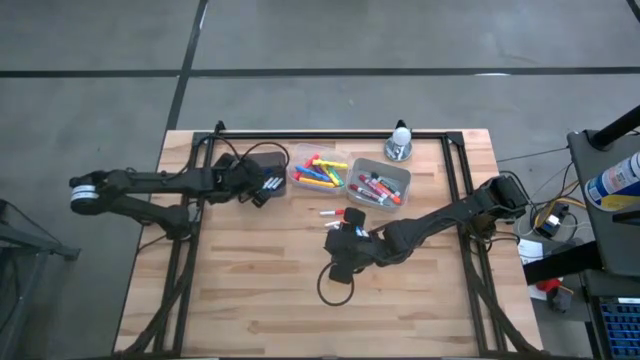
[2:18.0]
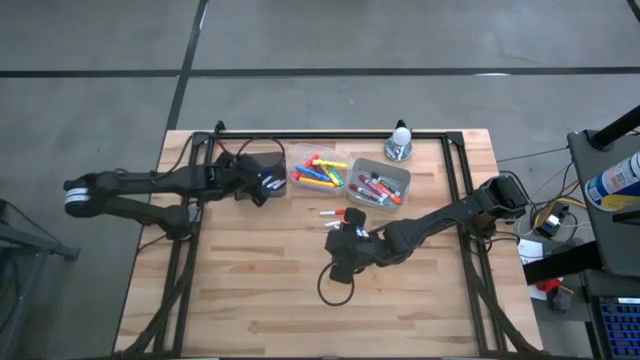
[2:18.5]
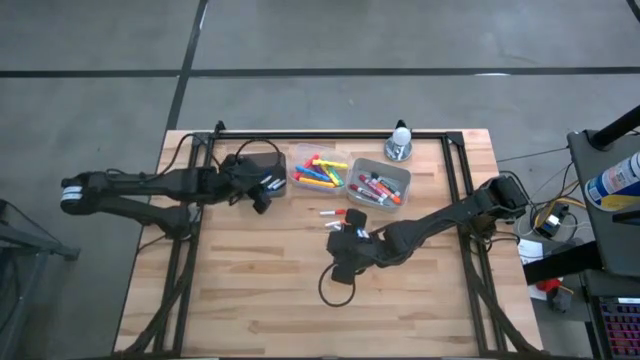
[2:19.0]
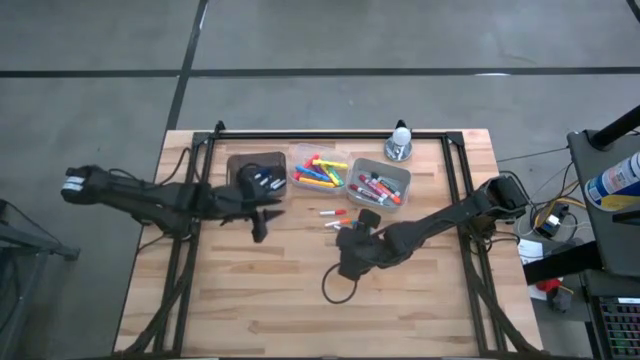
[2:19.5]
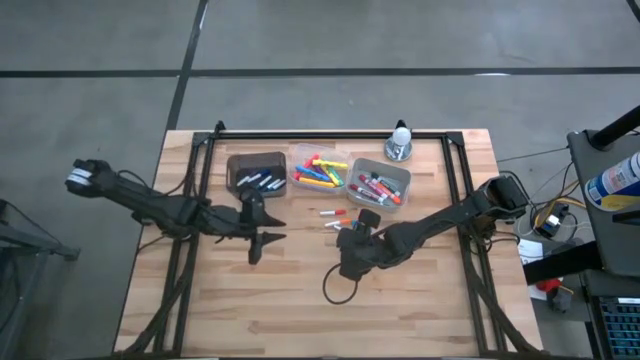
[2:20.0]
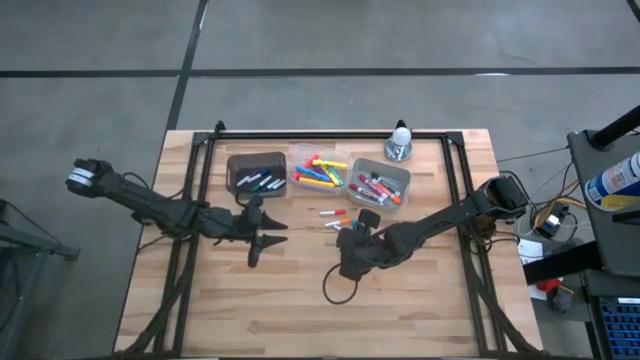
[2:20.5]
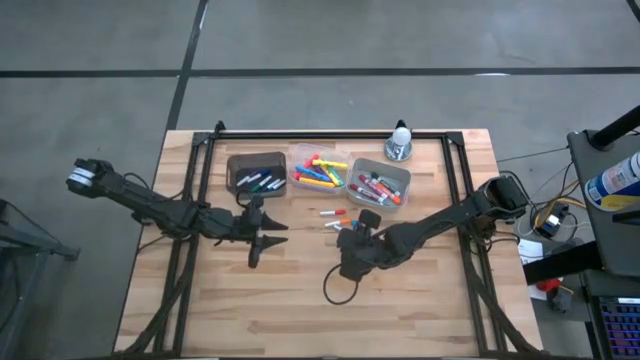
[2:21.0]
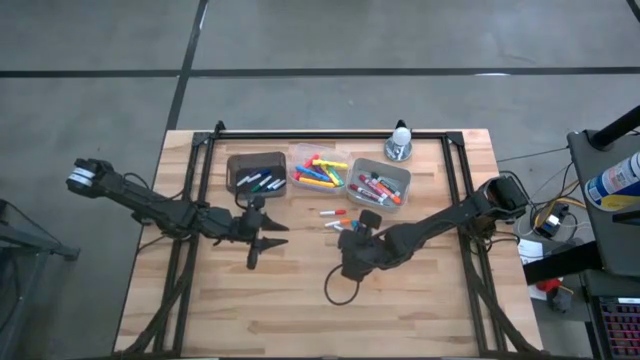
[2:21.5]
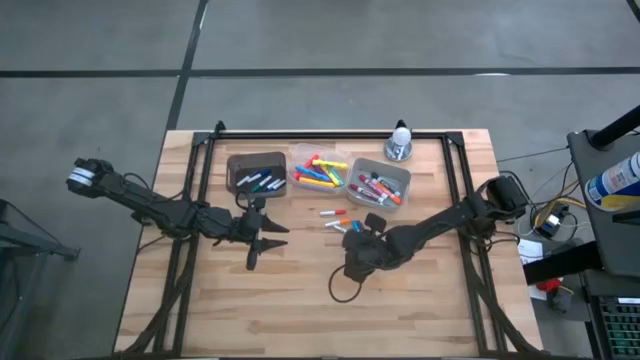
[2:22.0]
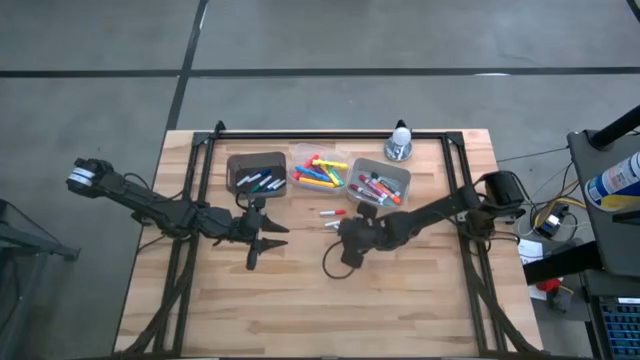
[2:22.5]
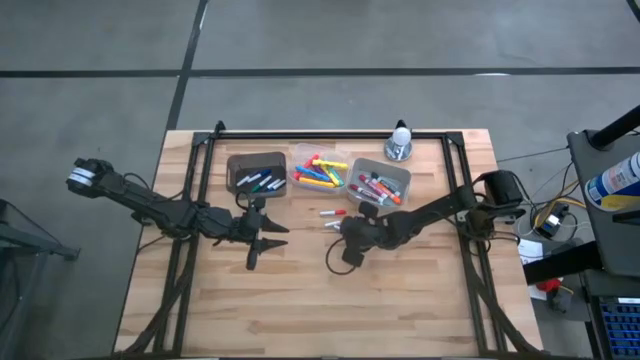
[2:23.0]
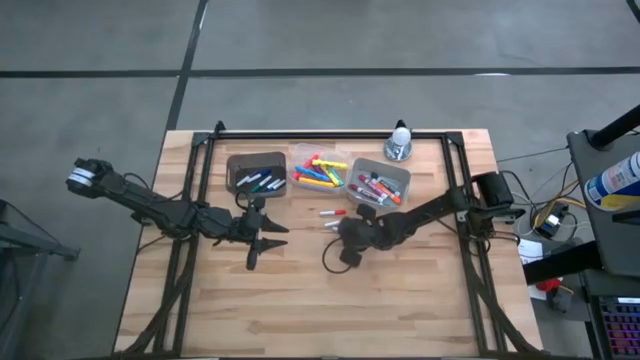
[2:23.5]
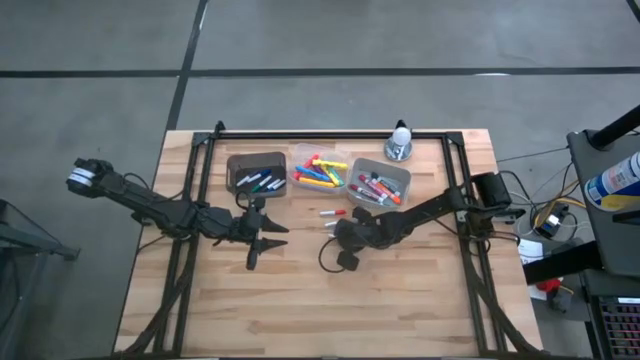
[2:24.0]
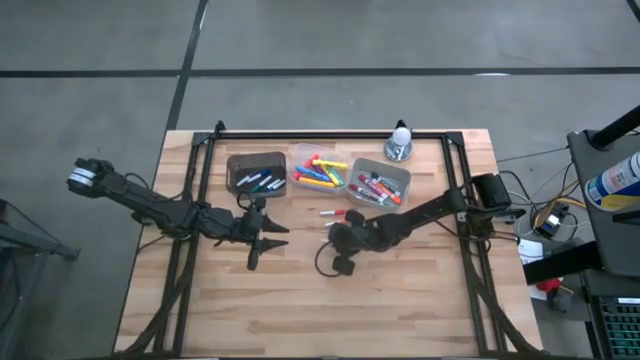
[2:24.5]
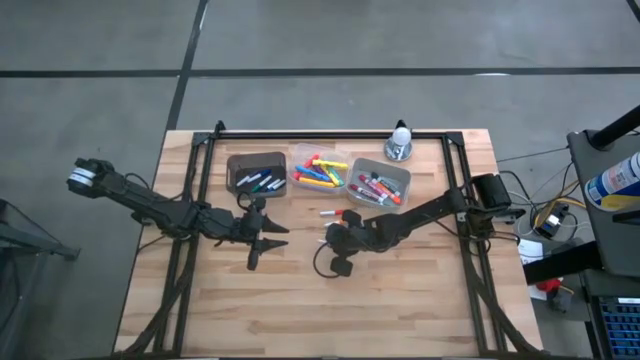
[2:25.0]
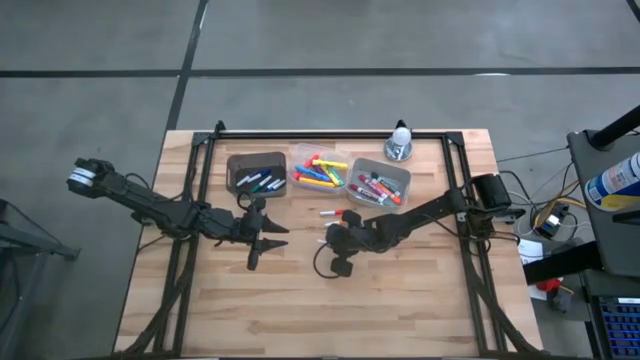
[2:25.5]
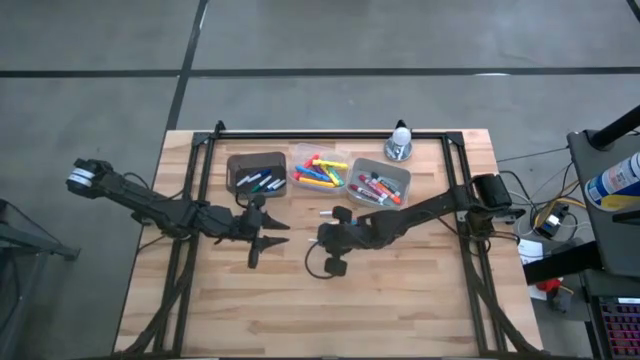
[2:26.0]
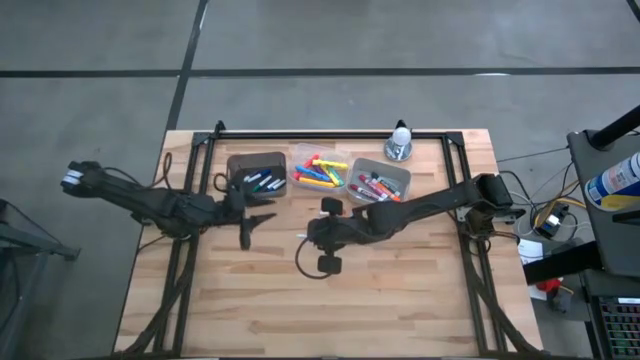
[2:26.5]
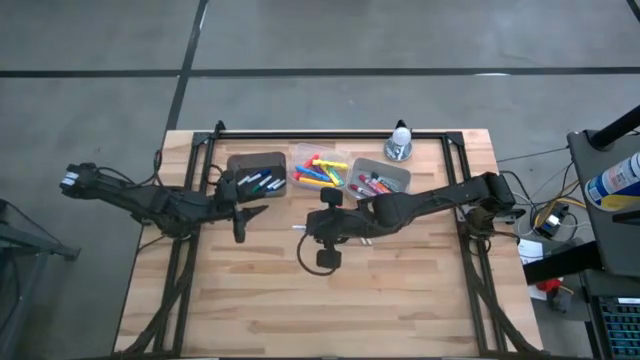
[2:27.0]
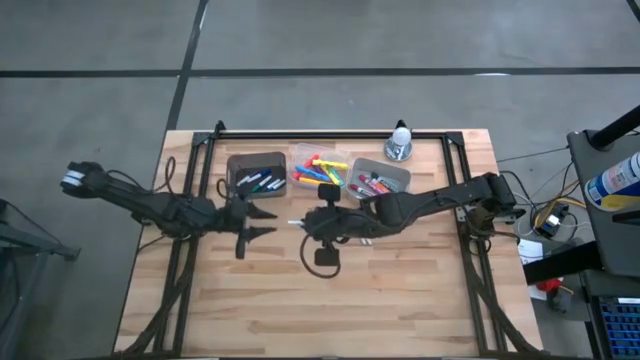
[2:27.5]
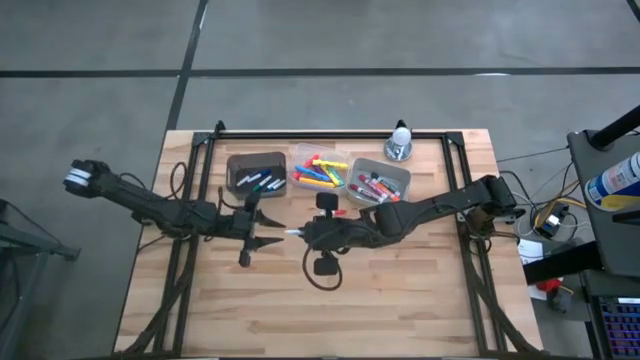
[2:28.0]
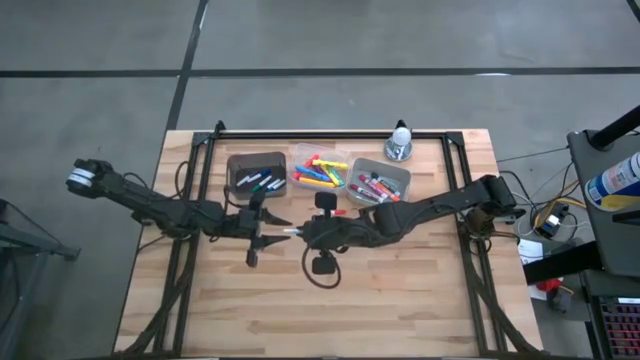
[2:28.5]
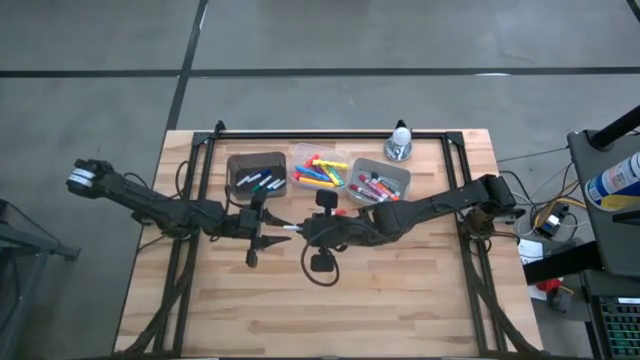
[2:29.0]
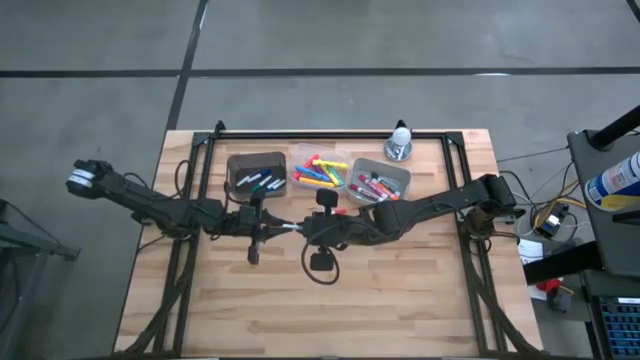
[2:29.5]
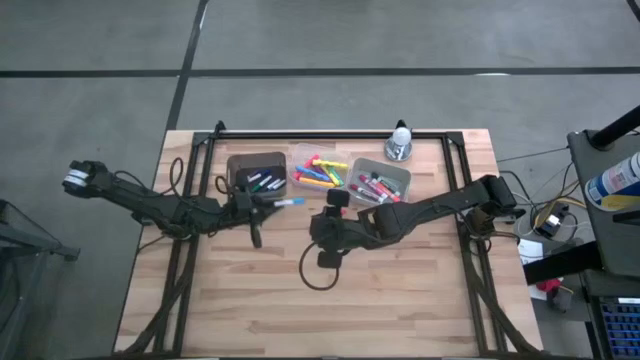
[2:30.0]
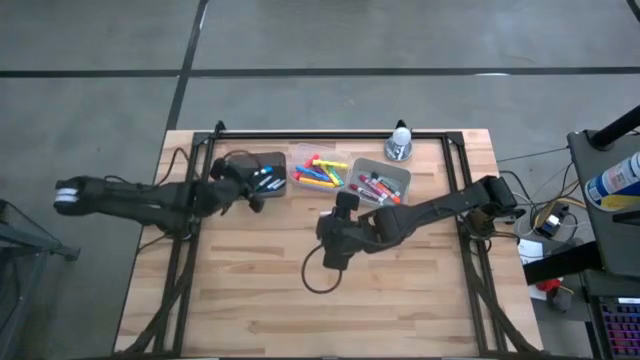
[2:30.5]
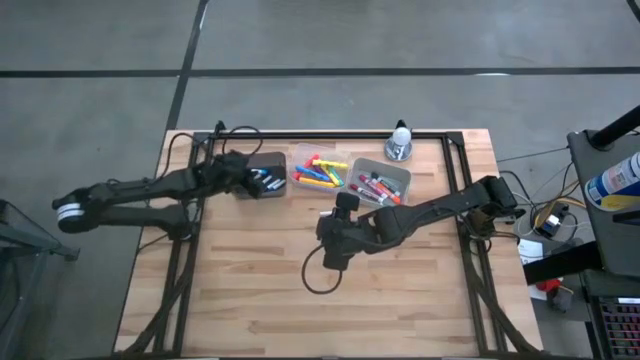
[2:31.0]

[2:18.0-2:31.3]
Task: Pick & Place Markers
Put the light blue mini marker into the black bin

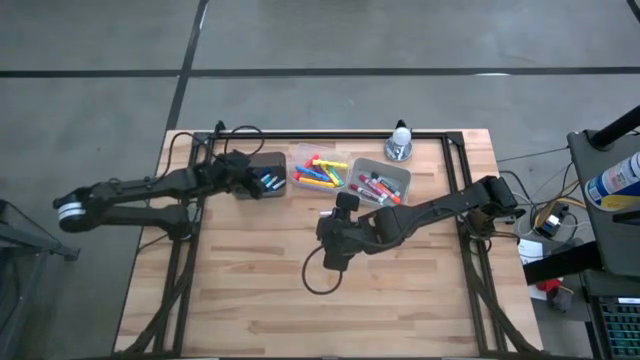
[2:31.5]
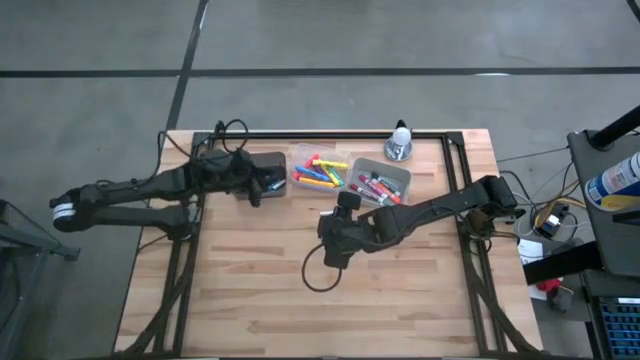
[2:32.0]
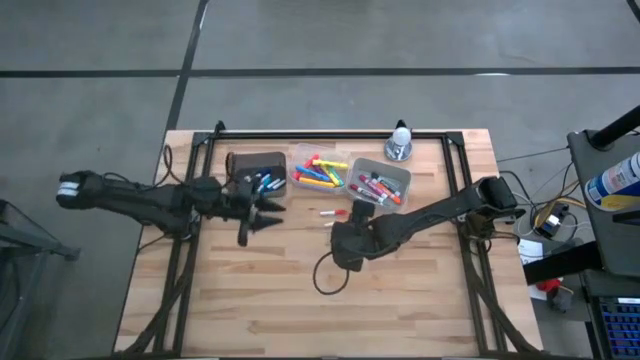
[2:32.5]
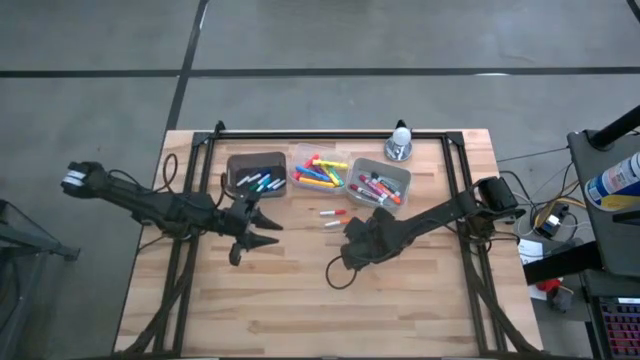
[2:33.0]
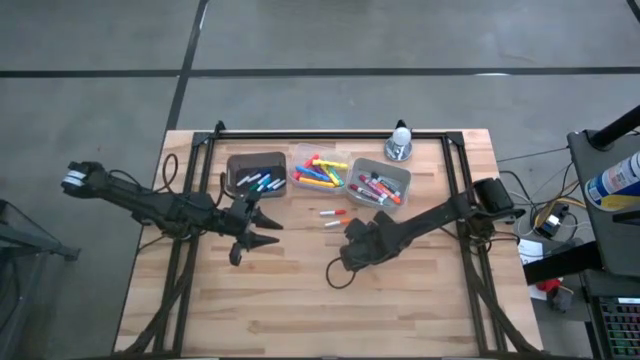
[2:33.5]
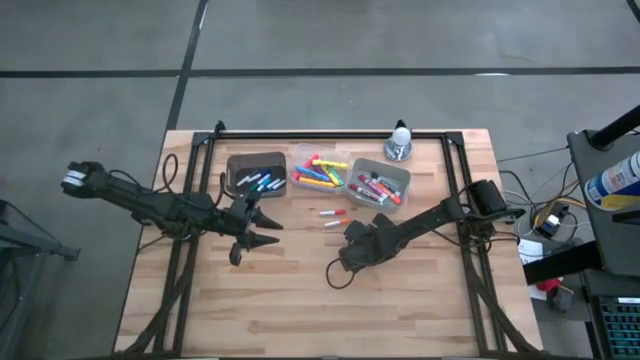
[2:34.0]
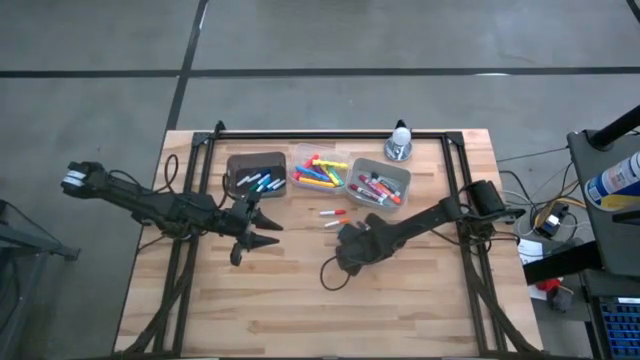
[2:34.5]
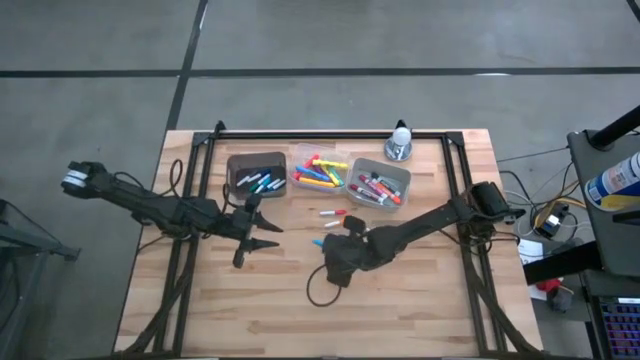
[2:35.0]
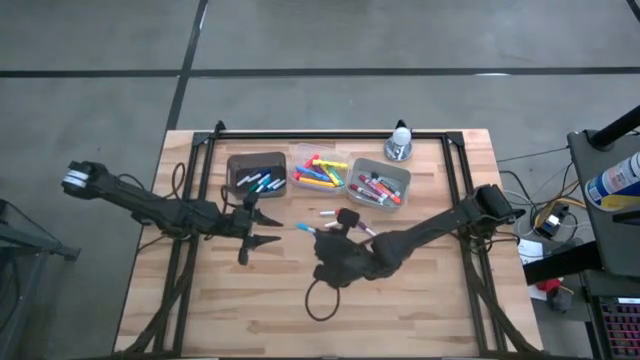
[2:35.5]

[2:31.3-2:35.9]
Put the light blue mini marker into the black bin

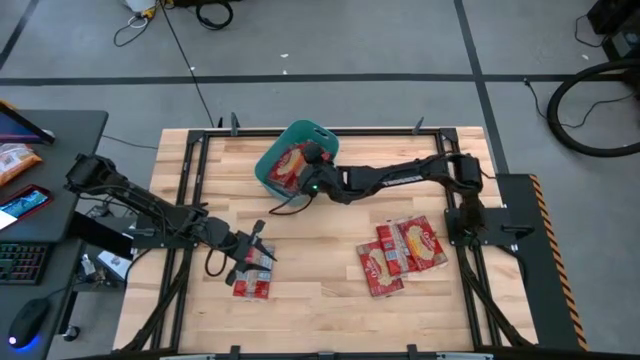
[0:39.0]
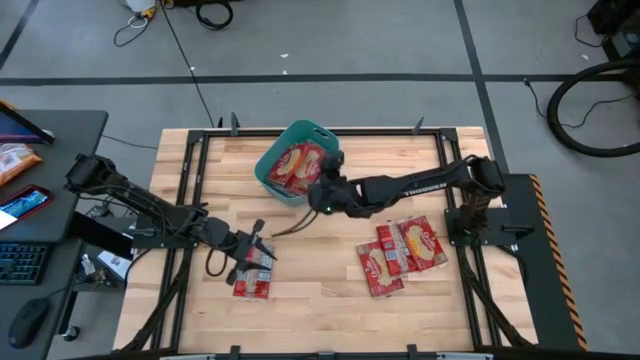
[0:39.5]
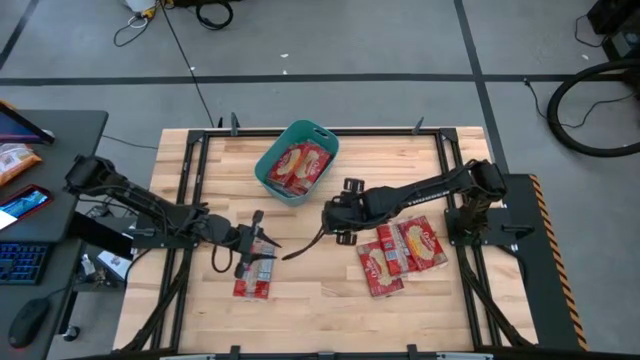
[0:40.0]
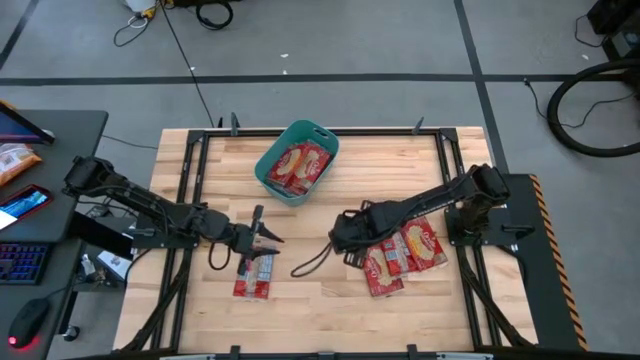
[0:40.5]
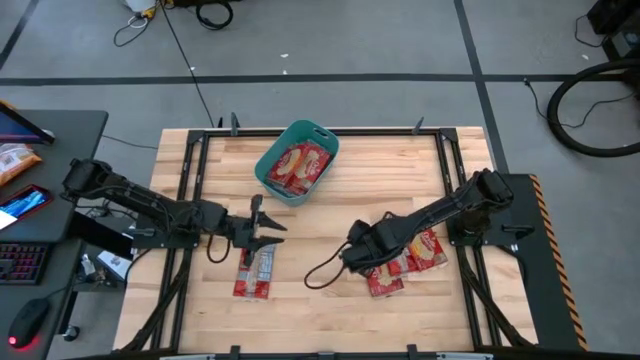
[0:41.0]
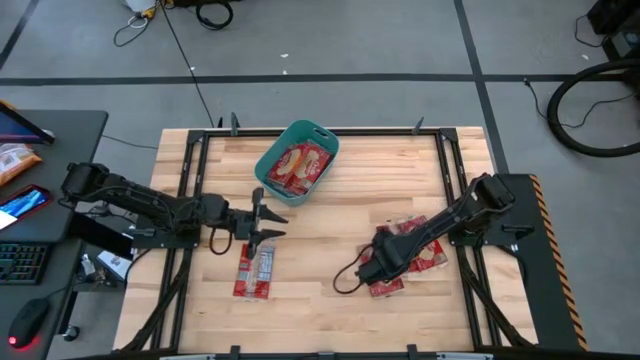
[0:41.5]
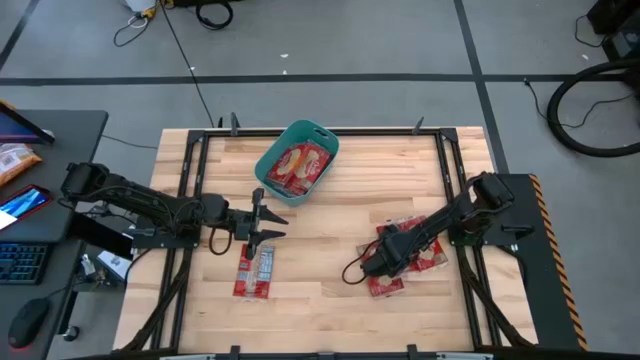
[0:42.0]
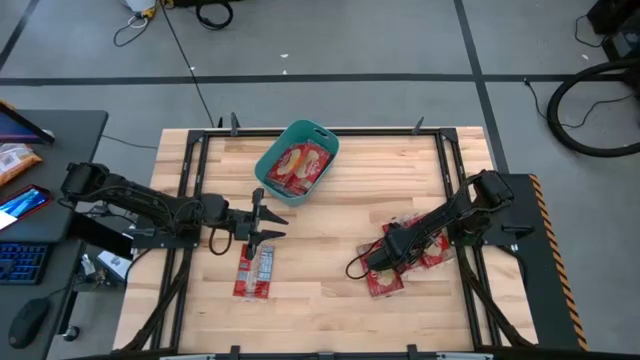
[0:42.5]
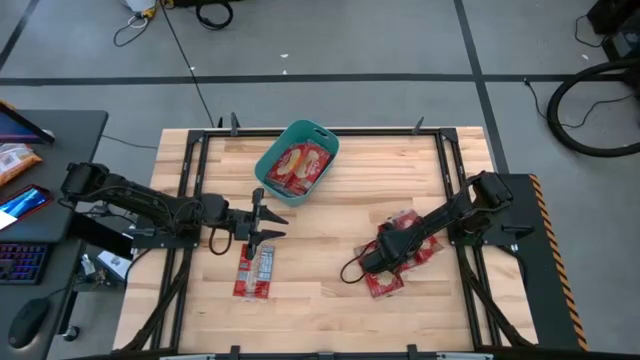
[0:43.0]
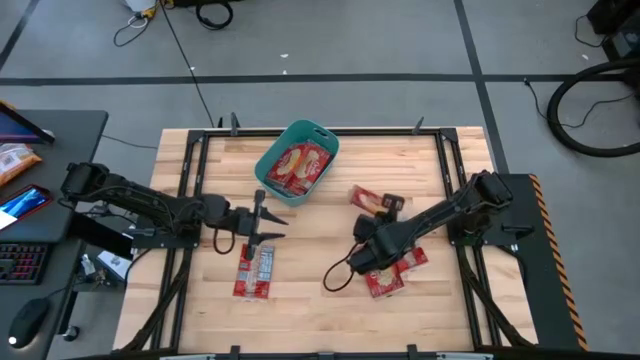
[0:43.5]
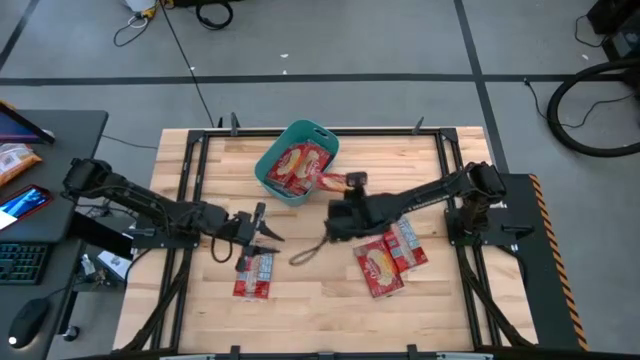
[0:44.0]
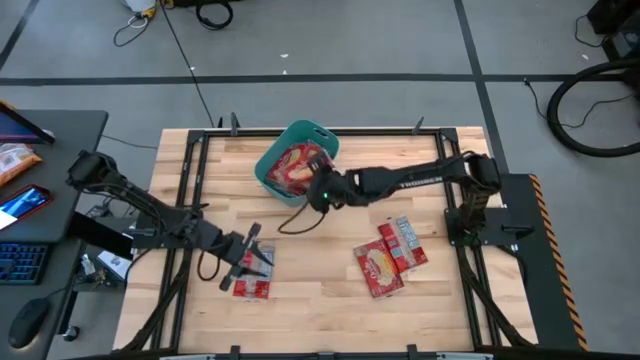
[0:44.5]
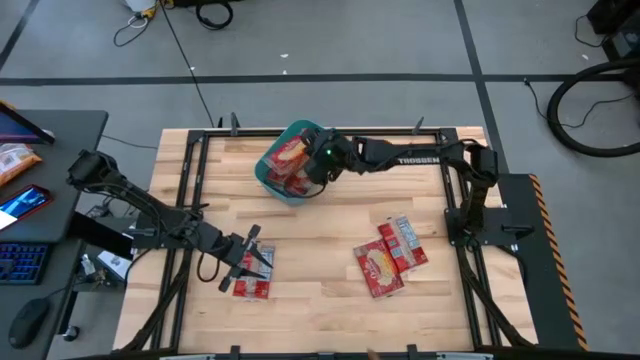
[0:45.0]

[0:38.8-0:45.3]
Task: Sort popcorn bags into baskets
Put the red popcorn bag into the blue bin
